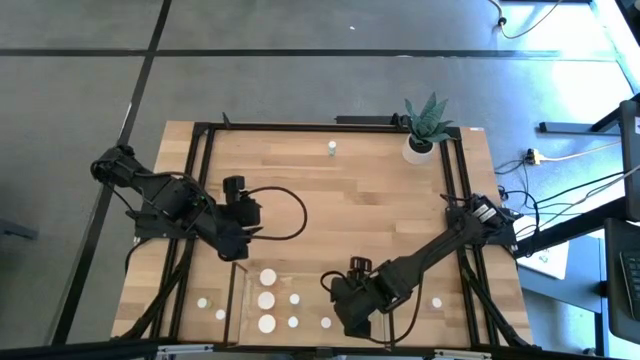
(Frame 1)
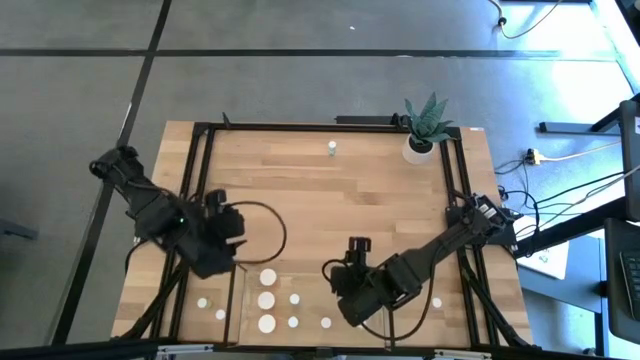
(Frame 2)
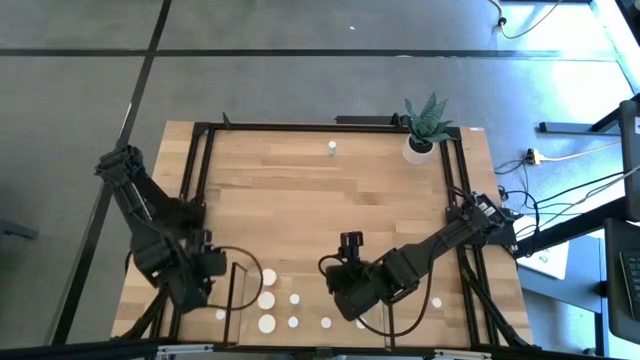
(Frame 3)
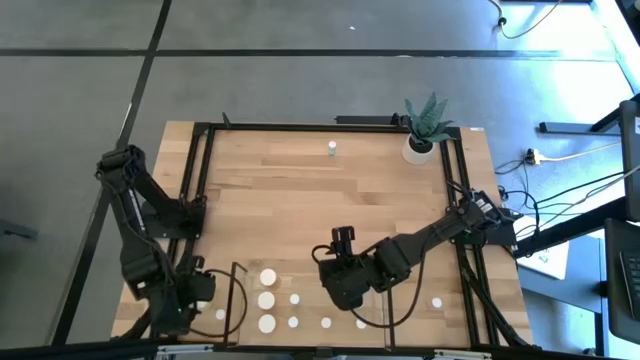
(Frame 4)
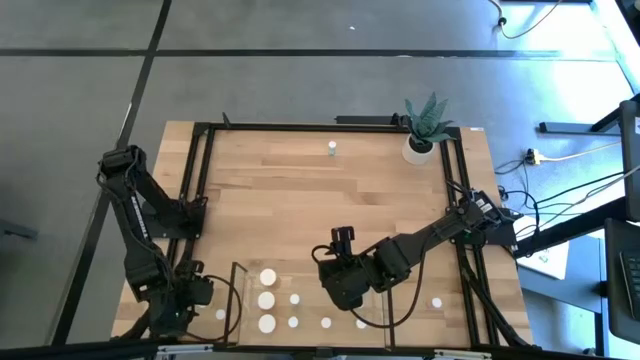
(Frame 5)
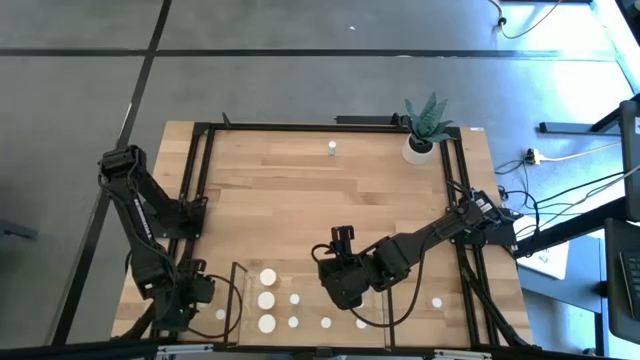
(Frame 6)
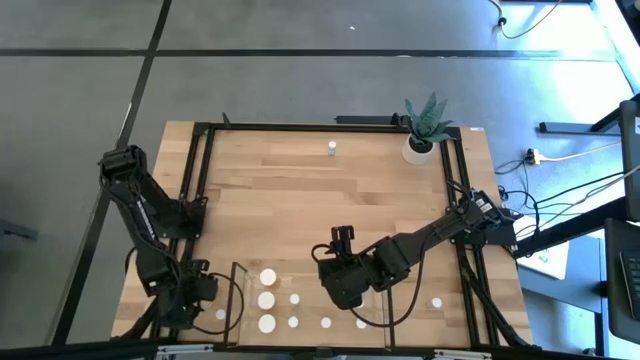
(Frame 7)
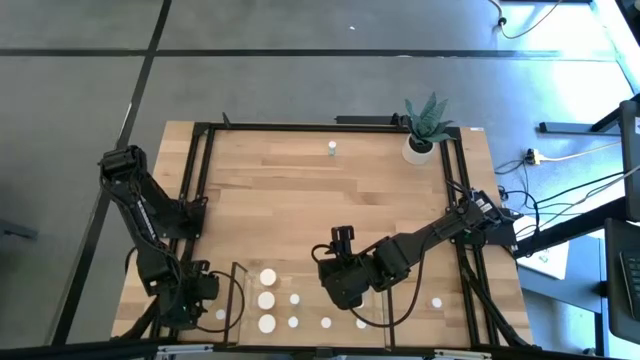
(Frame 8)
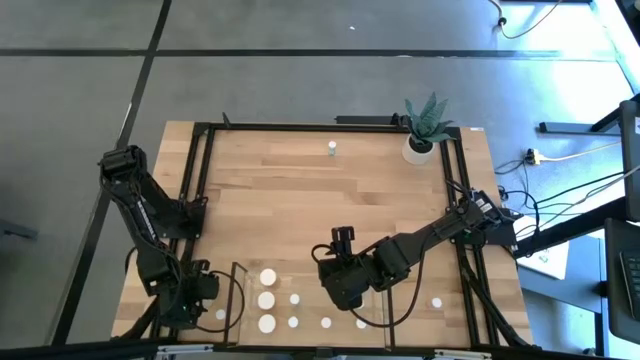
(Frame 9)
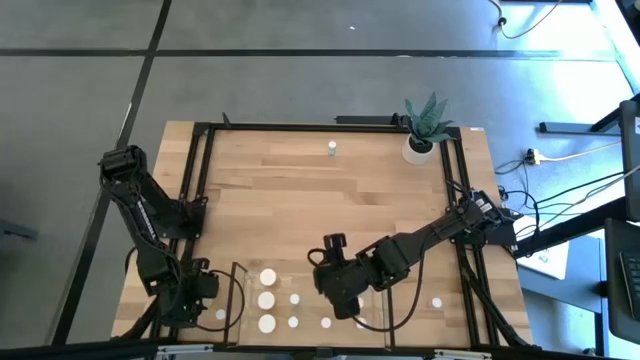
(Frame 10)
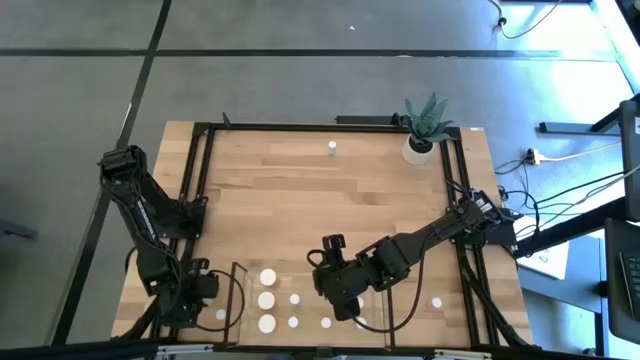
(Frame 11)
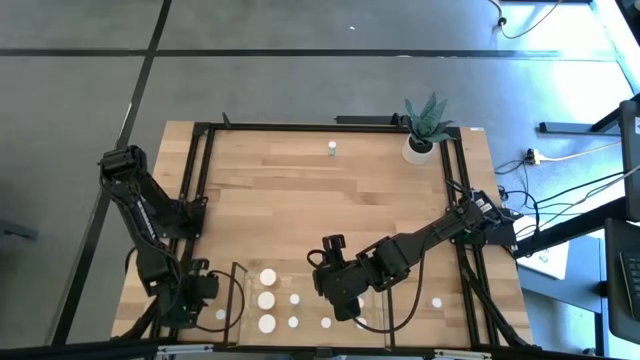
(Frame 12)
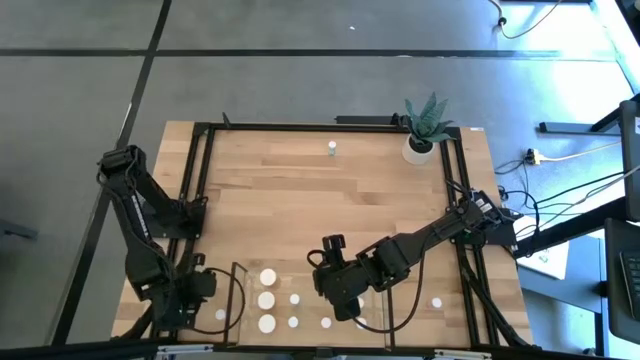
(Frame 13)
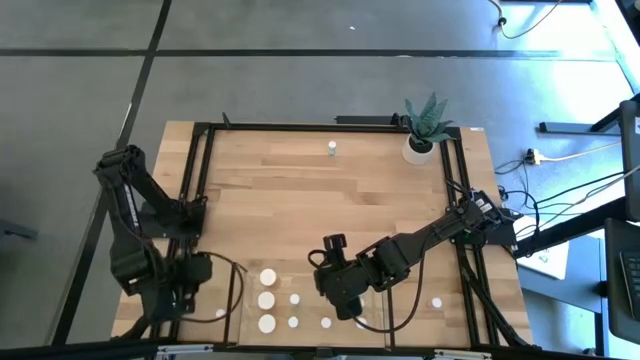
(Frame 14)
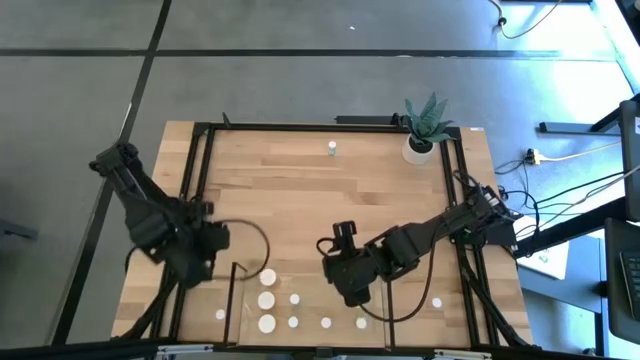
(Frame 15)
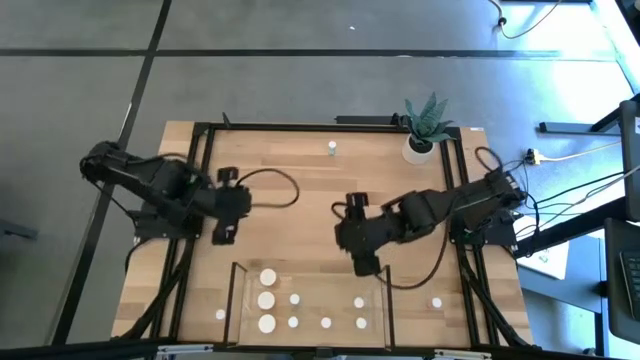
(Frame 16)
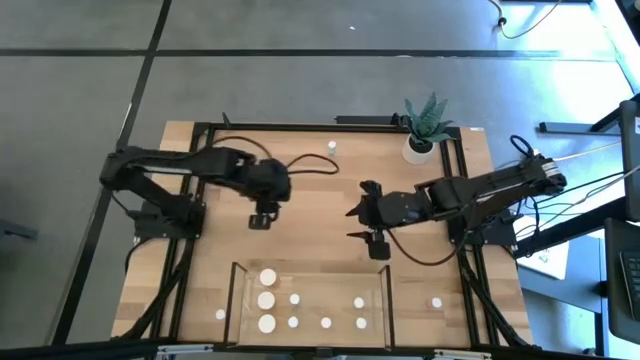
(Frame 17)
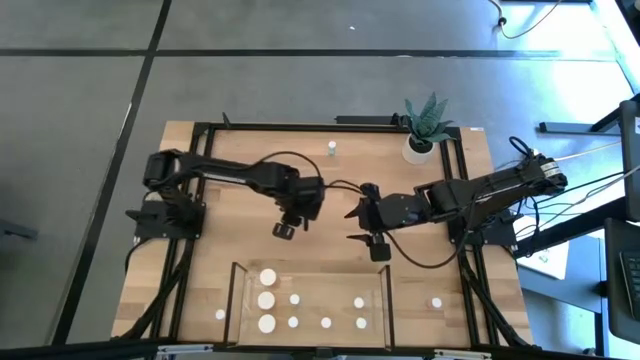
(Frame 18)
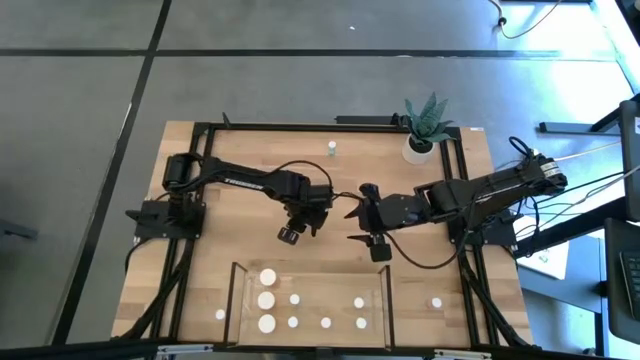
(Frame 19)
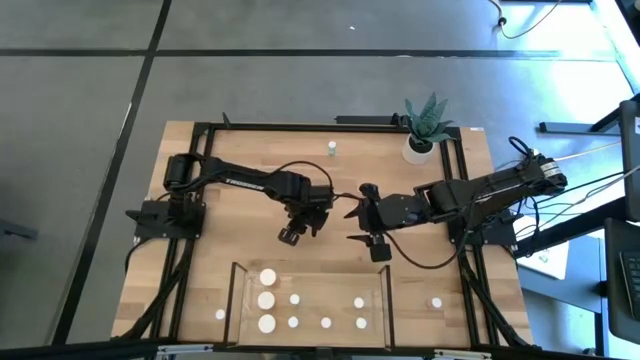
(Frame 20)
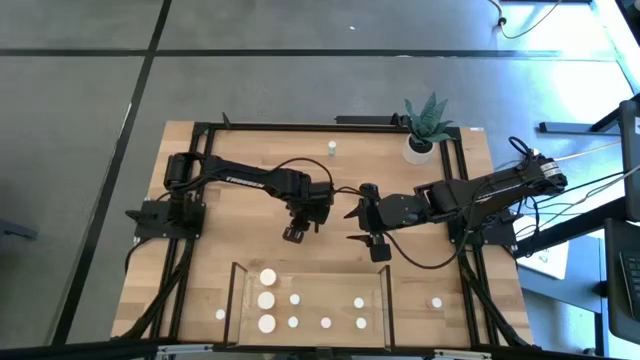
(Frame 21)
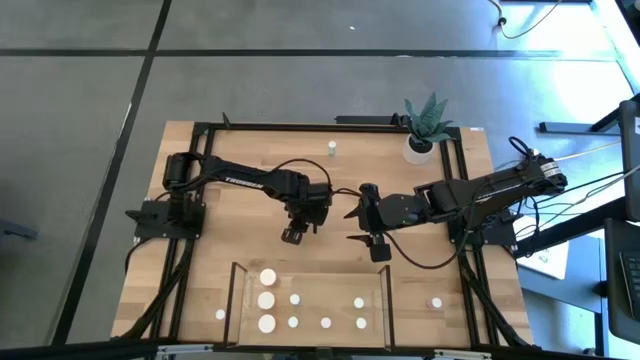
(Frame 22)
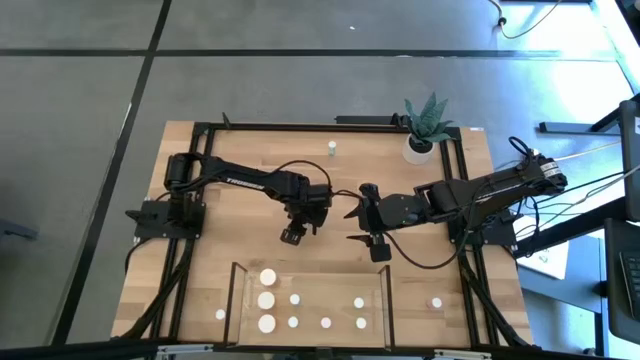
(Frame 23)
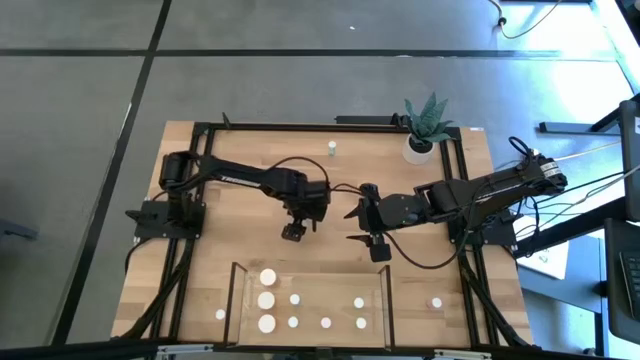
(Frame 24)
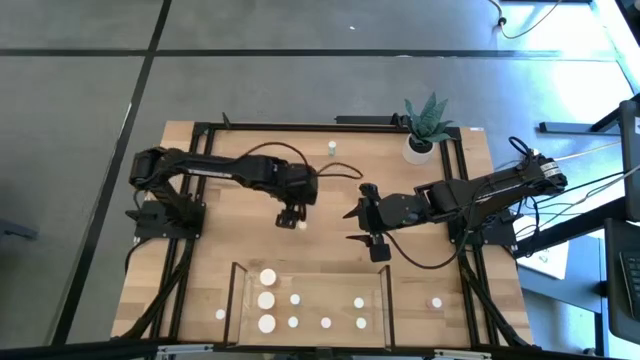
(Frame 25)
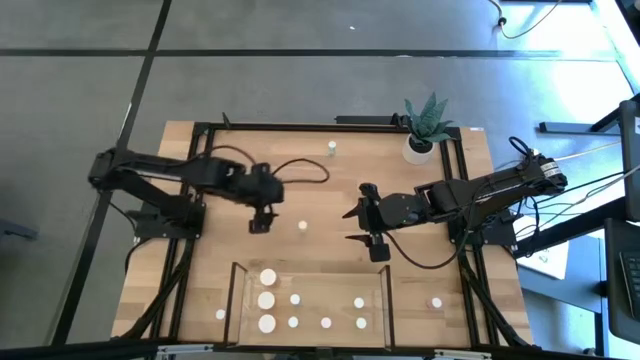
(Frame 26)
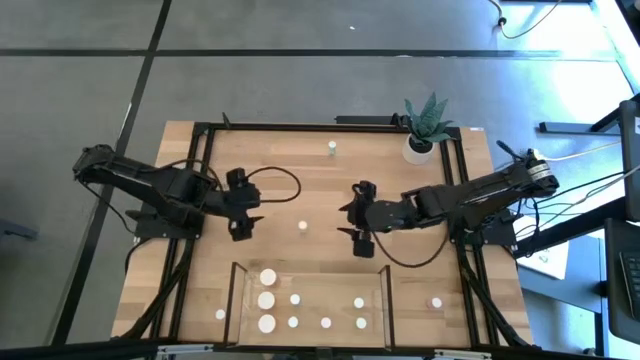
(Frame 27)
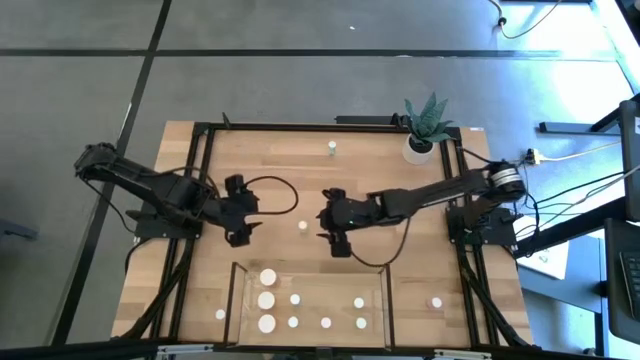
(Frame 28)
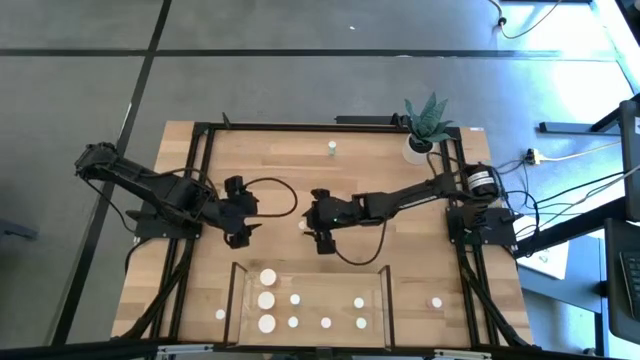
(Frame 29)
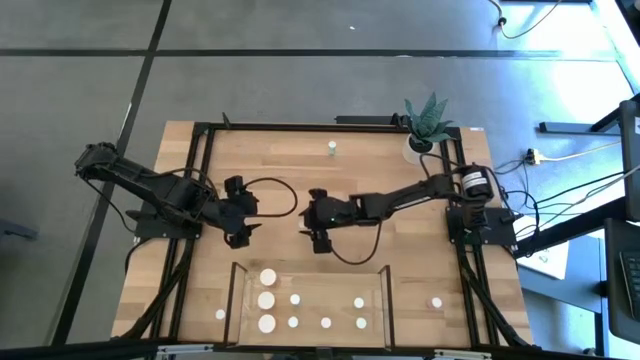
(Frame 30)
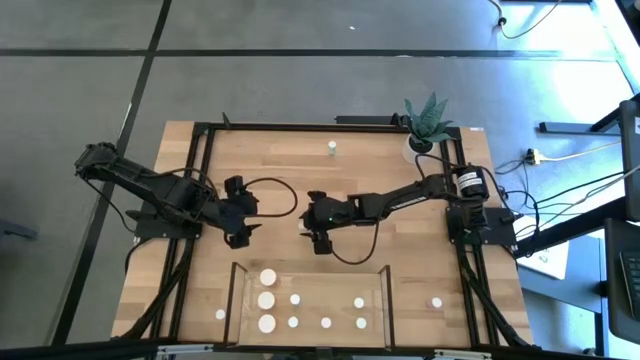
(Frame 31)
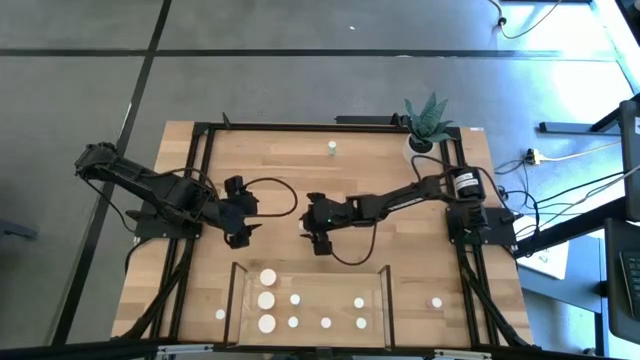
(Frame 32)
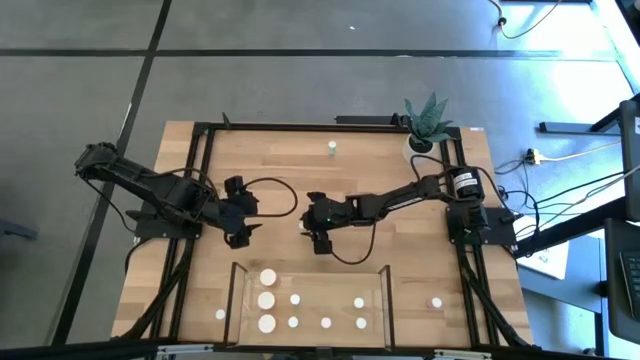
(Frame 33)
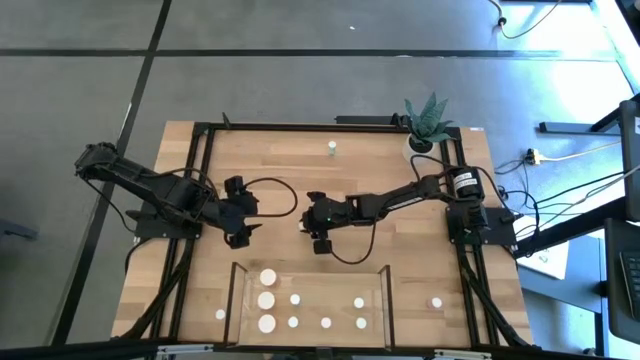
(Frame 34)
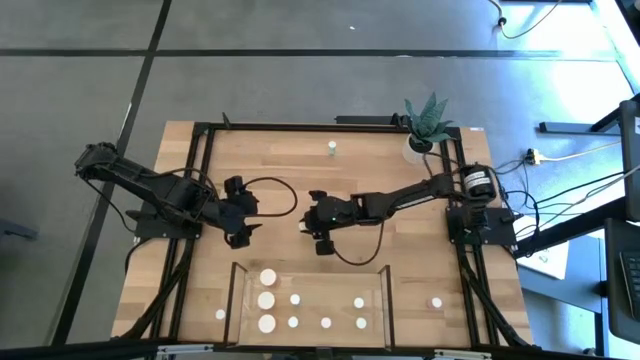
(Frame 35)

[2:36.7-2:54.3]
Task: Pick and place medicine bottles onto shelf by color
Put the yellow pill bottle on the shelf aligned with the other yellow pill bottles

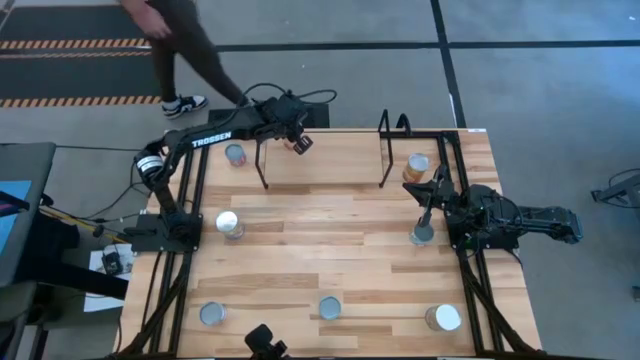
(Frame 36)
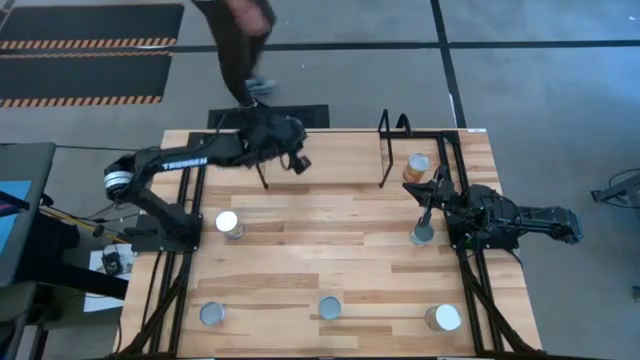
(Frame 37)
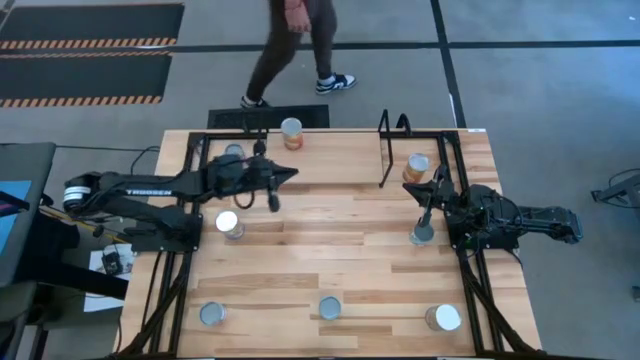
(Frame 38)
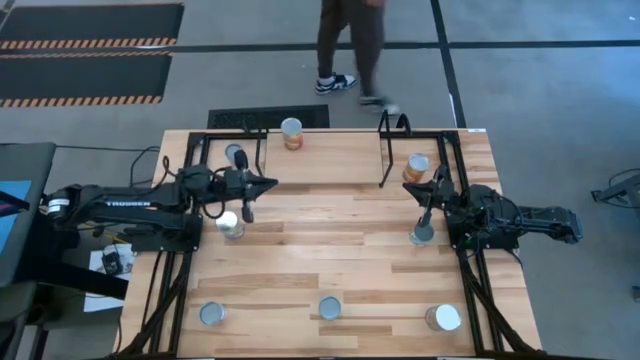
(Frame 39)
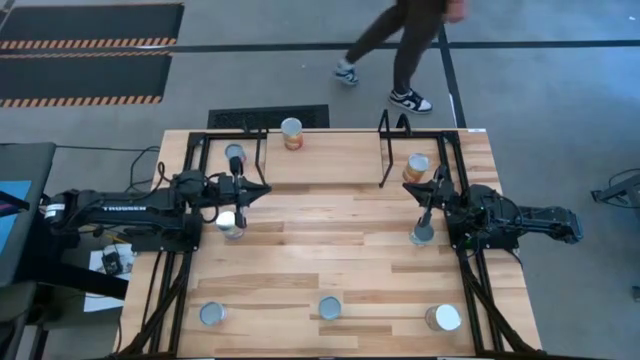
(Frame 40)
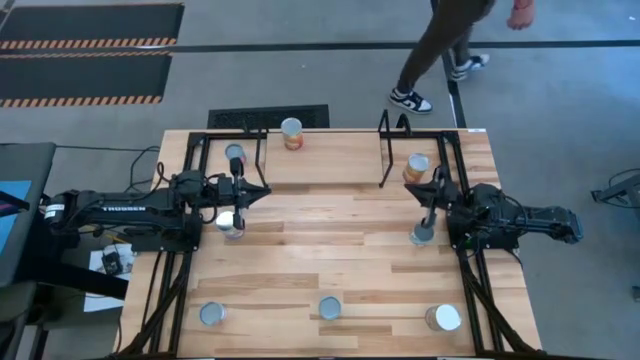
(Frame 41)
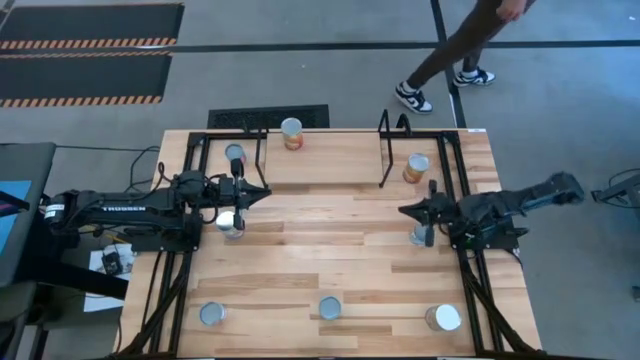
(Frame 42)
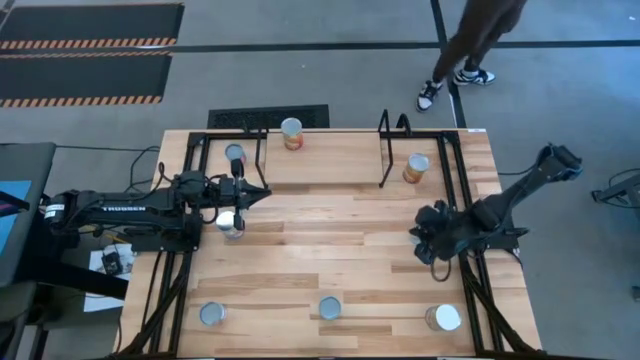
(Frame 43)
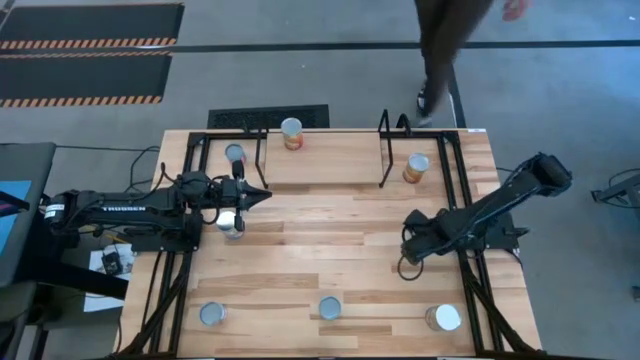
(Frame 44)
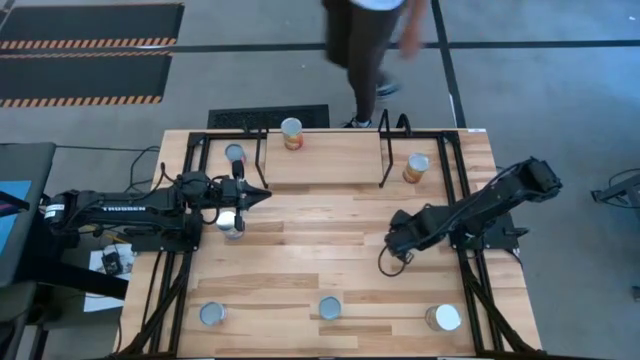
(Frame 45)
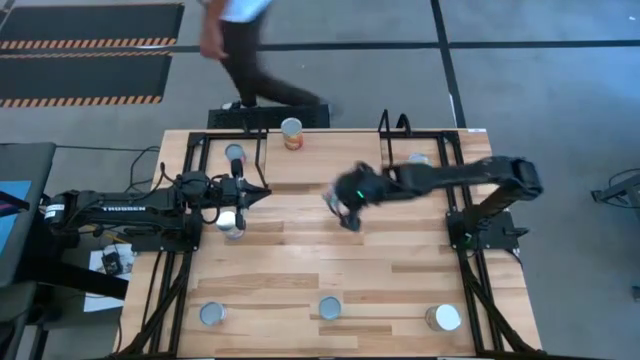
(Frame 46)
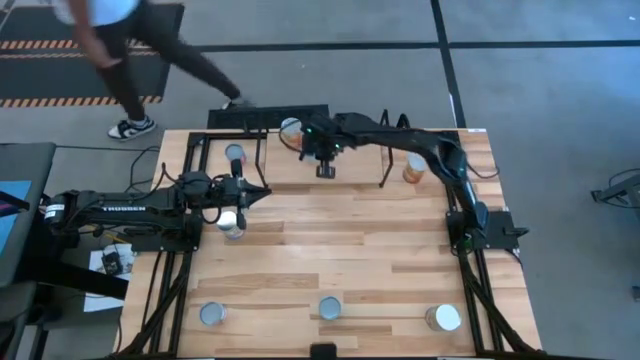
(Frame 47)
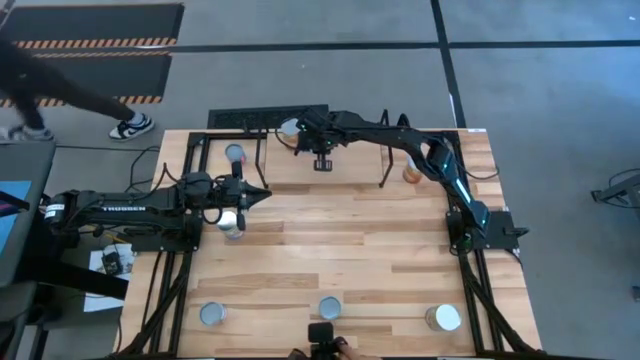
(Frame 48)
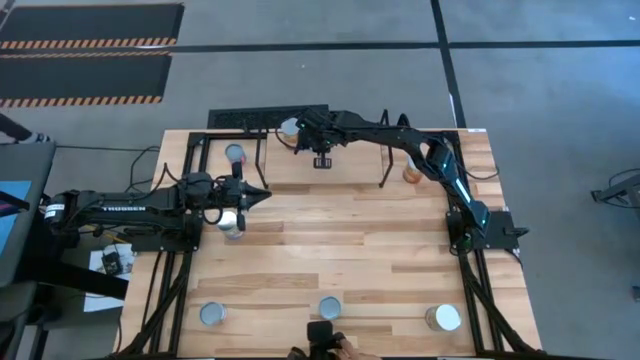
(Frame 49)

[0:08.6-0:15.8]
Task: Pick and place cans onto a shelf
Put the canned carrots on the shelf
